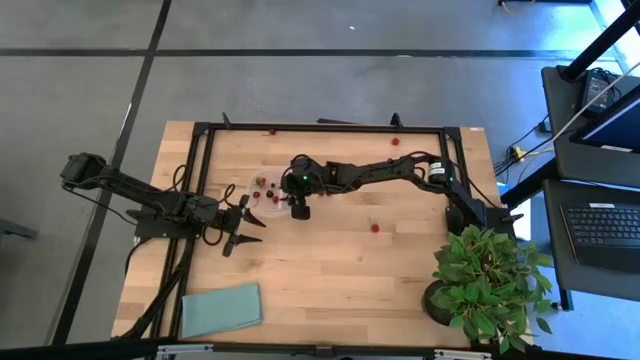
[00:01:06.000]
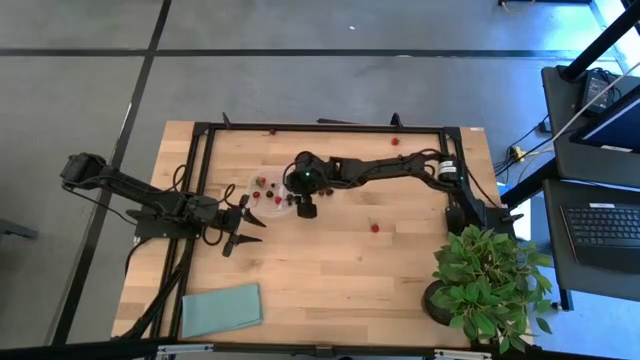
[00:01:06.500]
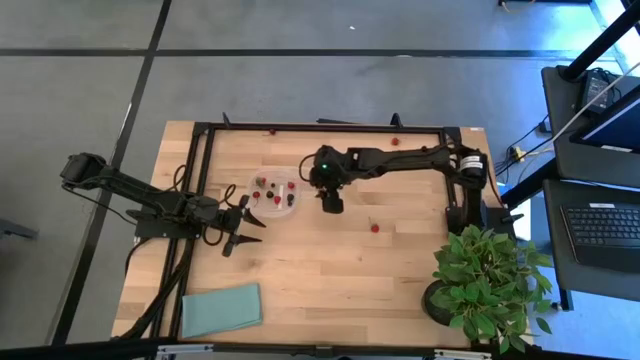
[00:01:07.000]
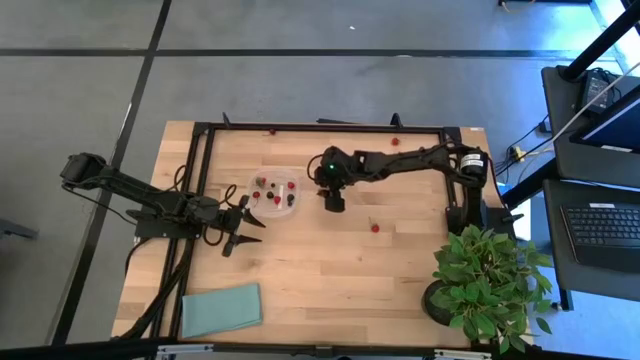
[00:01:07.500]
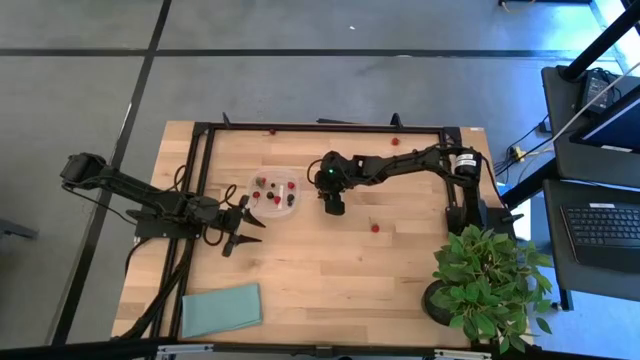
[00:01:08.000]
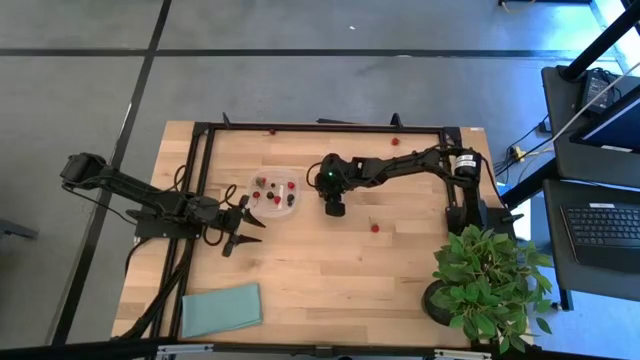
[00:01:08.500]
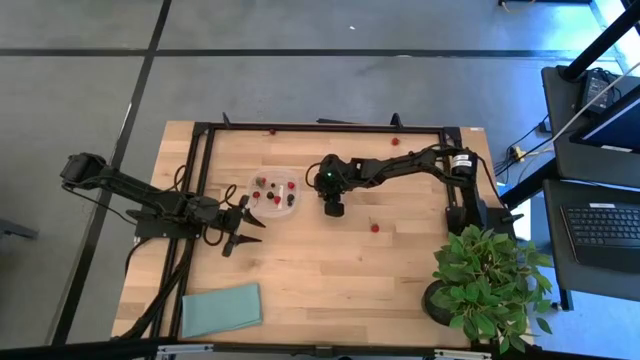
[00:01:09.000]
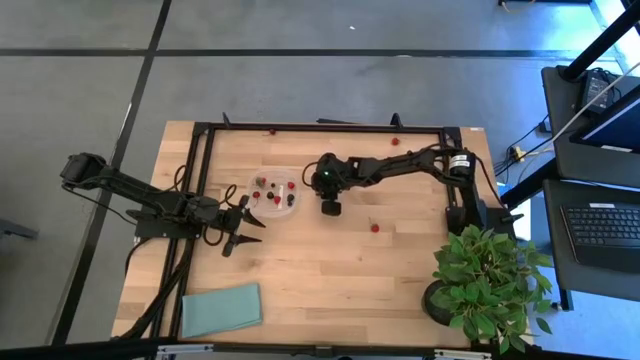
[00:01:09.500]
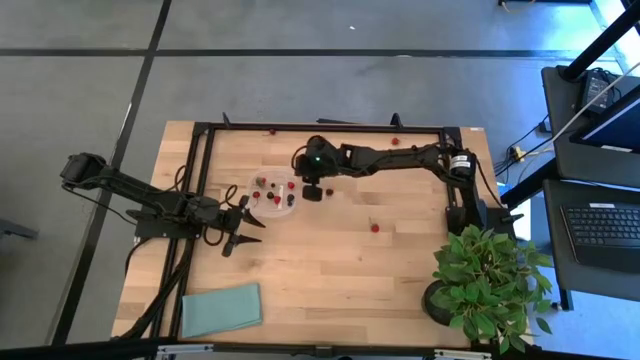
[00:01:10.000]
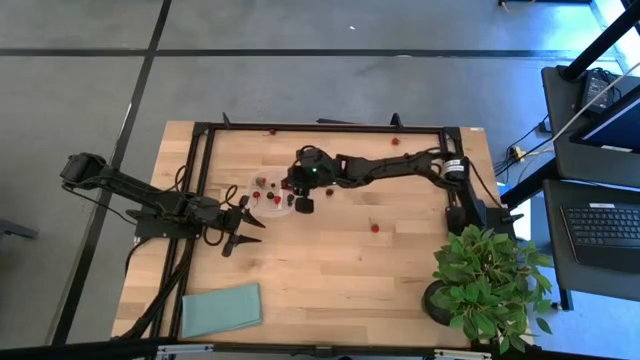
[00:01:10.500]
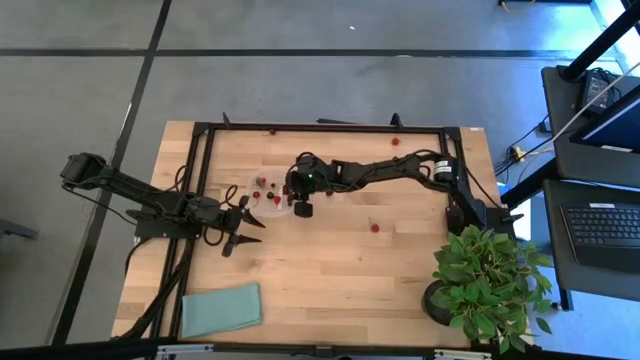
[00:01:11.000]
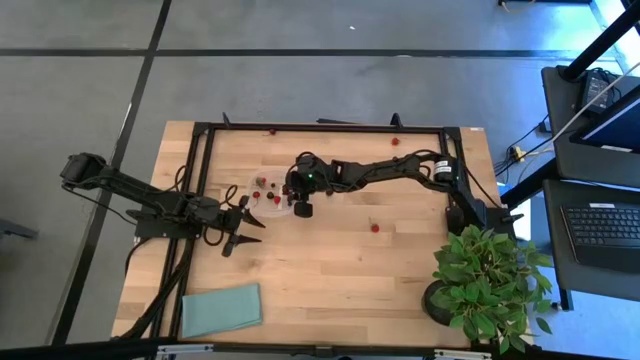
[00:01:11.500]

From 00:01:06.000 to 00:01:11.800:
Task: Pick and placing Produce into tupperware
Put the bottom red cherry into the transparent container

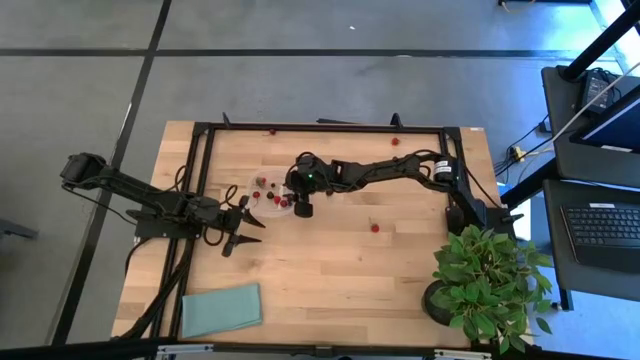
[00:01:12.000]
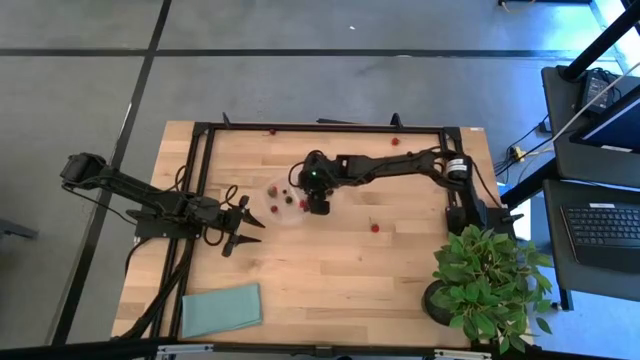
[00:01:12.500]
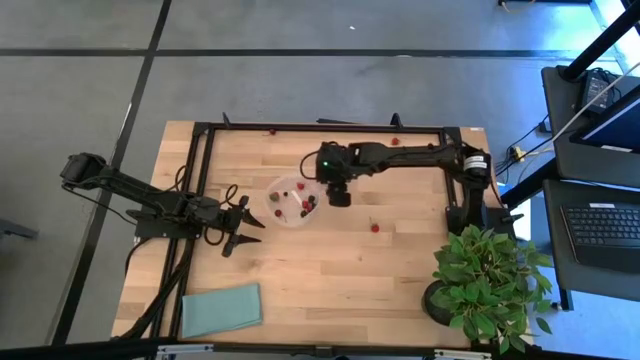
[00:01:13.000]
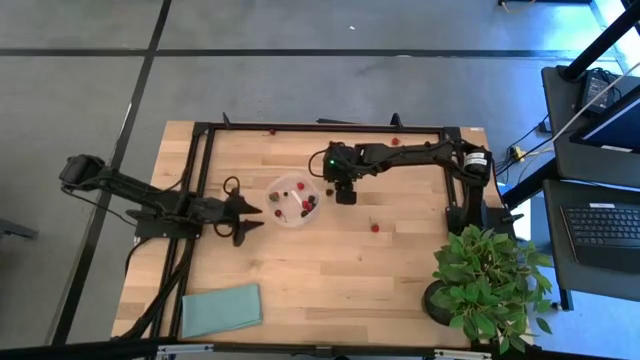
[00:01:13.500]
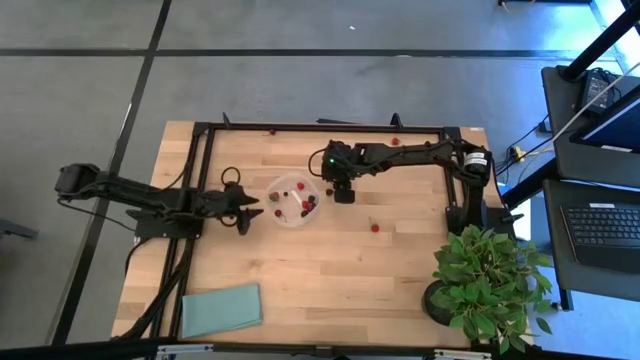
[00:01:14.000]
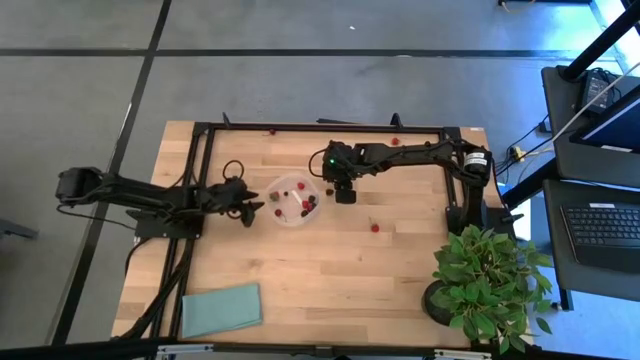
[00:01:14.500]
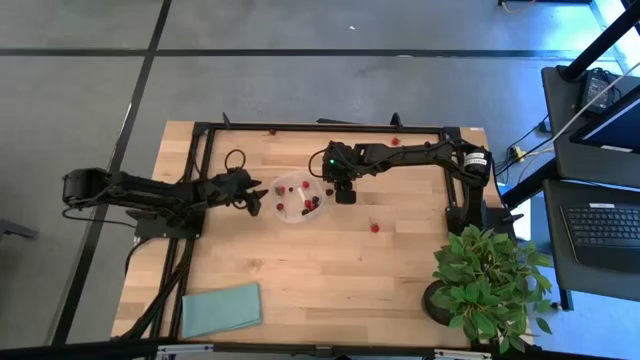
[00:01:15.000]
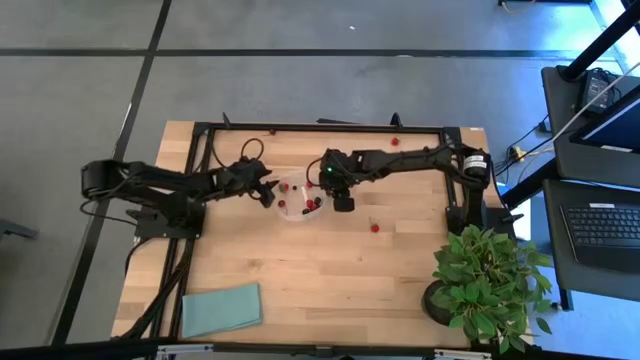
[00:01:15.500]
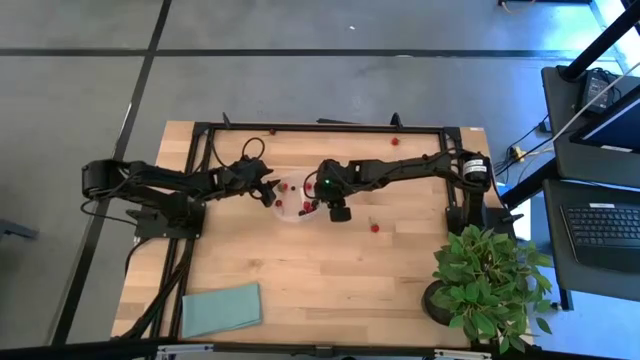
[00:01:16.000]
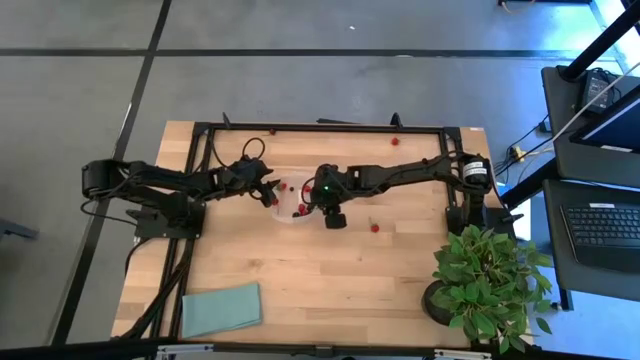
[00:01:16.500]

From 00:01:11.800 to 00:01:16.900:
Adjust the transparent container

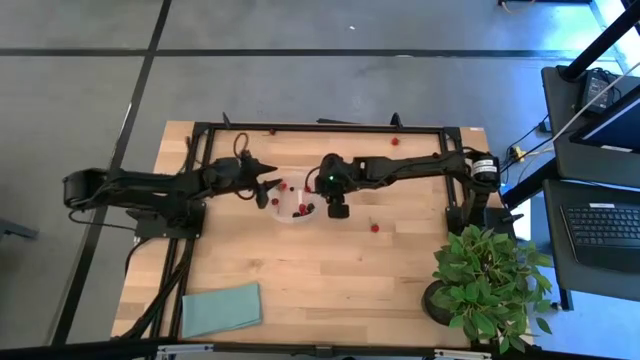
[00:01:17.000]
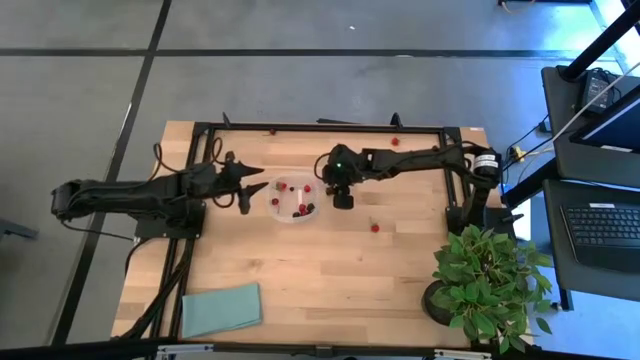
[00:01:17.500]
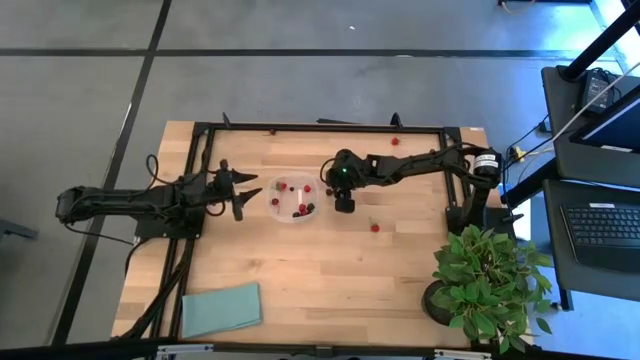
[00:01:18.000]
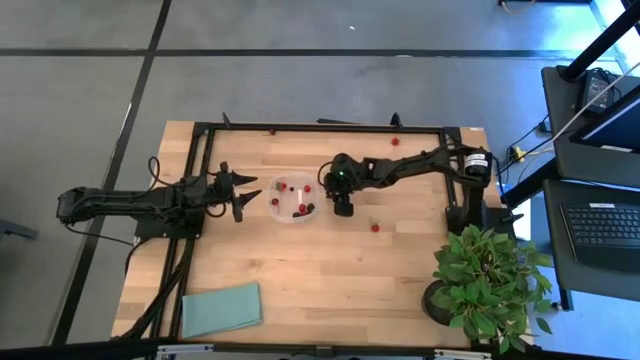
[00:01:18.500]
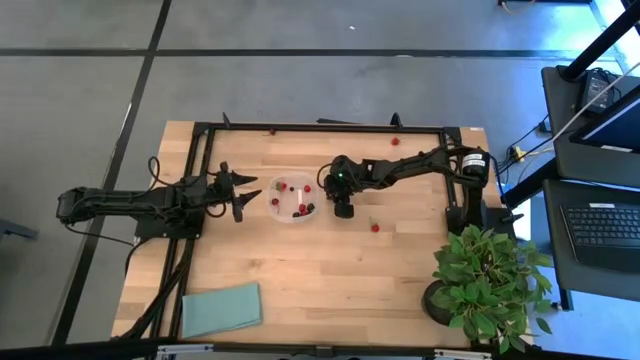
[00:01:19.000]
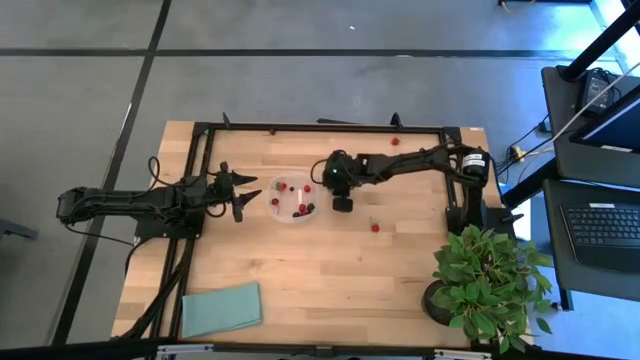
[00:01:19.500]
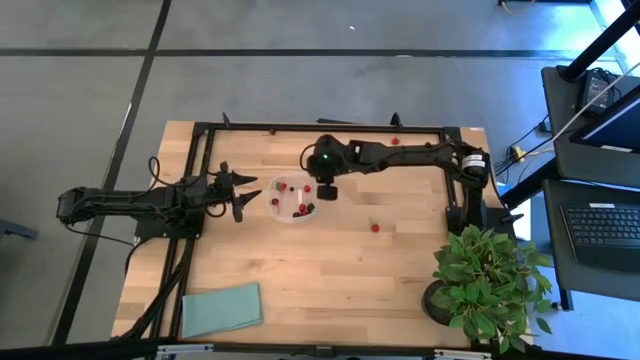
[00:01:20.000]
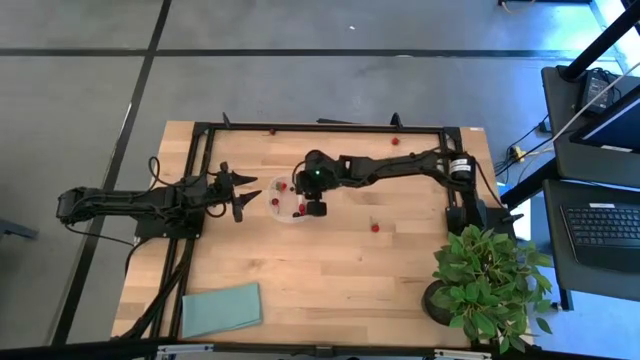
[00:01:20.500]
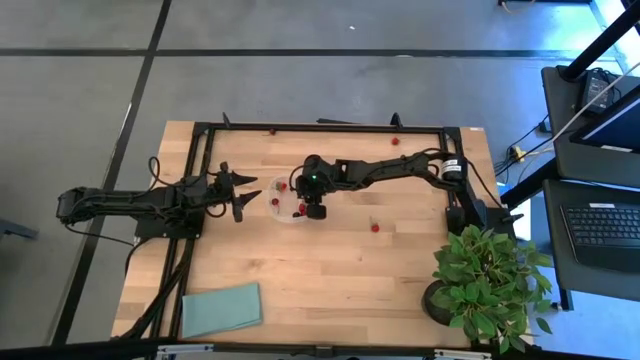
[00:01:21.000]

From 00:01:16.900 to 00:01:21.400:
Put the blackberry into the transparent container

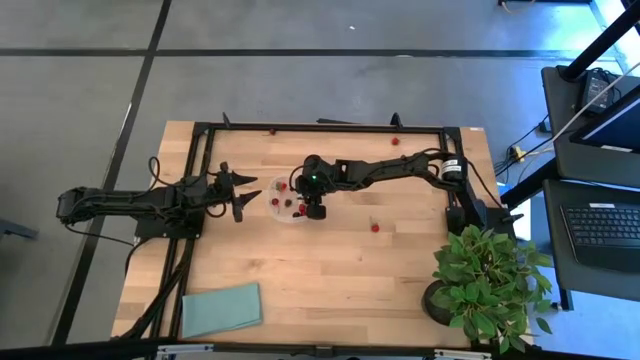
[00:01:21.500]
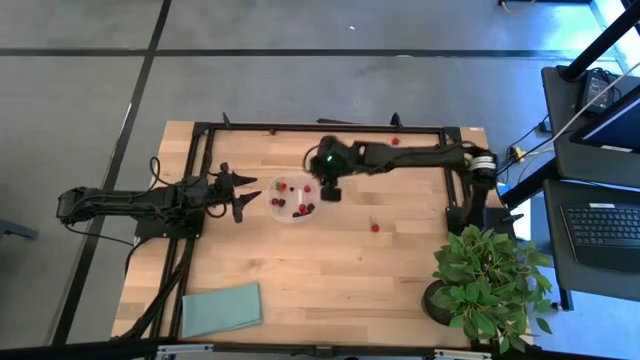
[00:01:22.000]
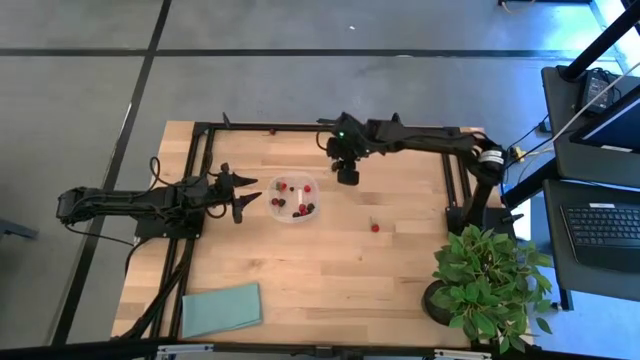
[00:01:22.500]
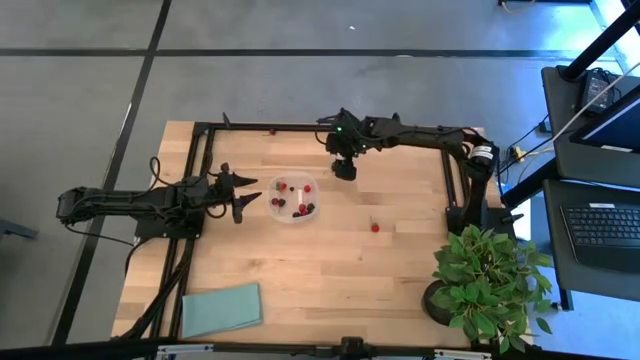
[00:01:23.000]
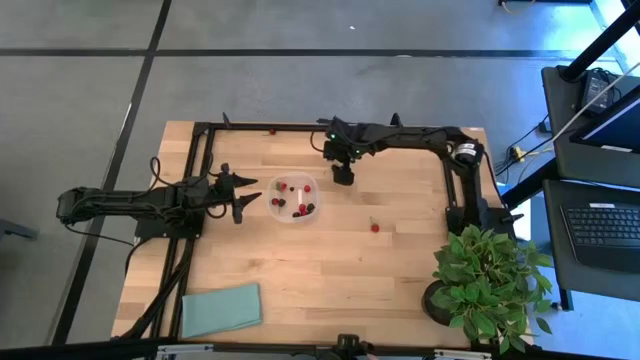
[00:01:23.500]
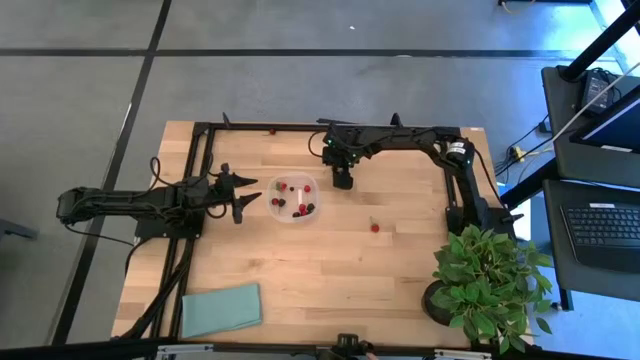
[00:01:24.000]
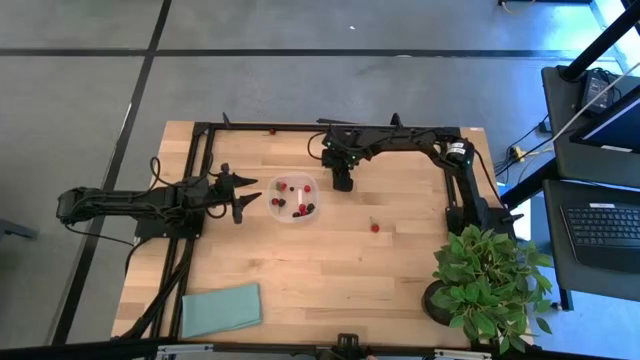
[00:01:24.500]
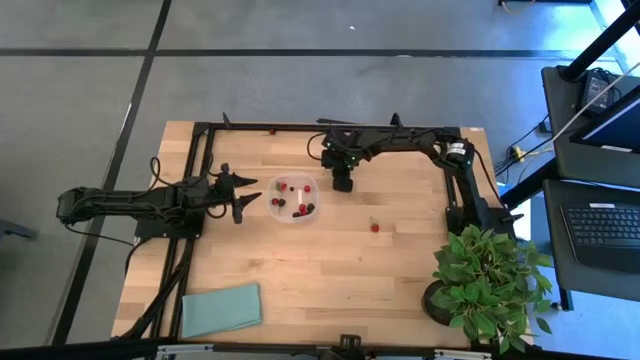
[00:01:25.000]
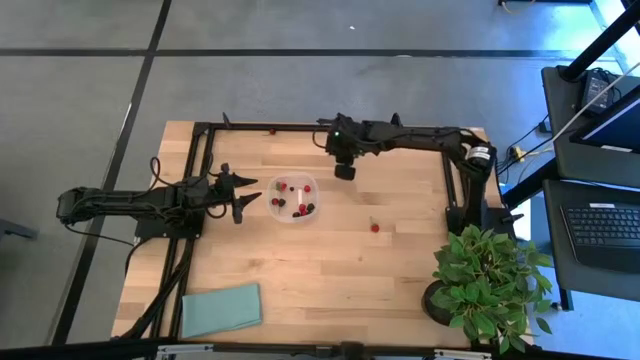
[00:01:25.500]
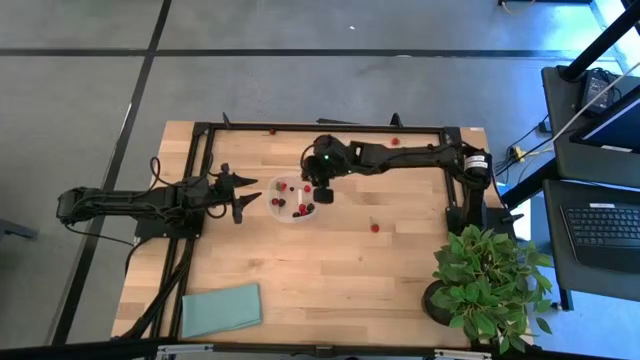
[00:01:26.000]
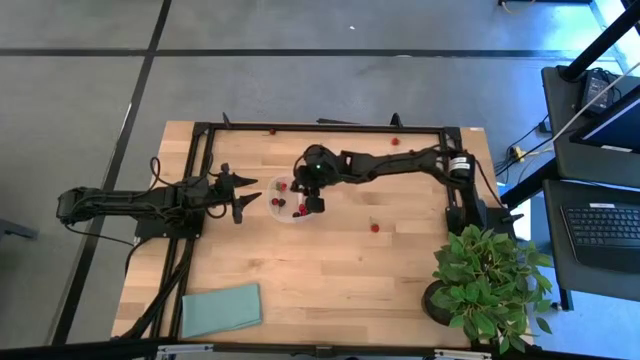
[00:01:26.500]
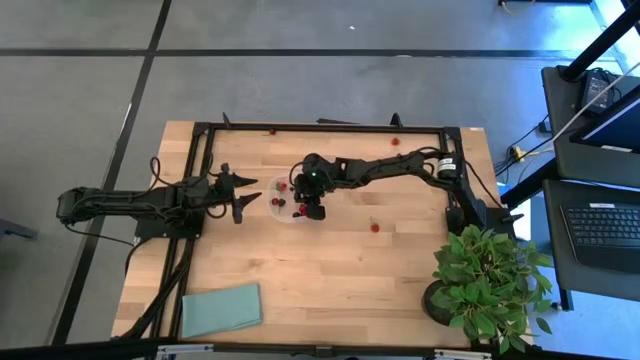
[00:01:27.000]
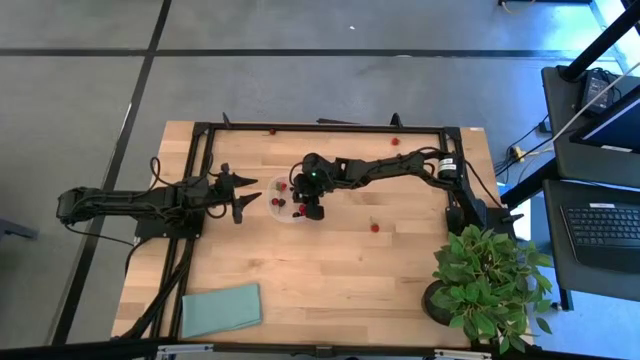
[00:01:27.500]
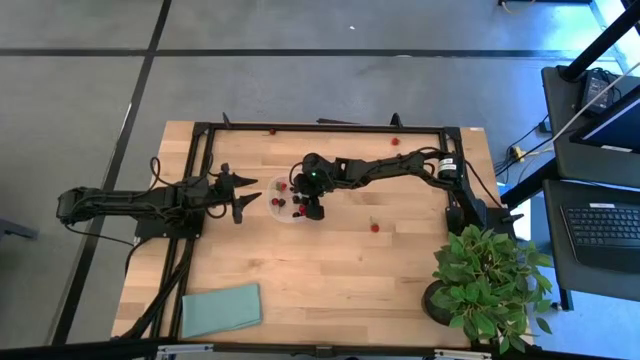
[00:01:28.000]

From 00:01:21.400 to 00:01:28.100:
Put the black cherry into the transparent container
